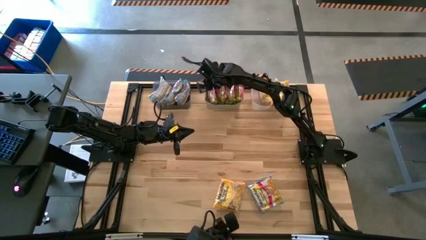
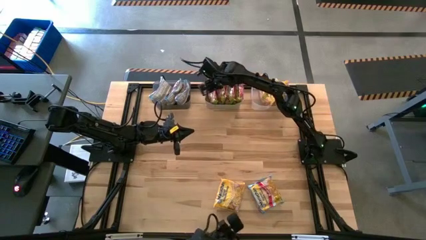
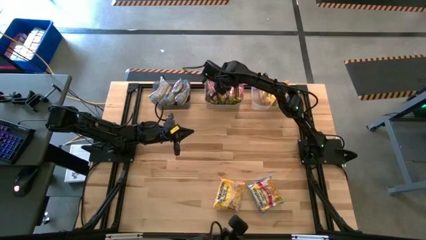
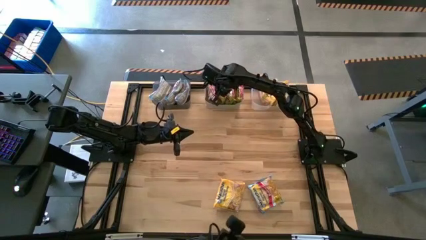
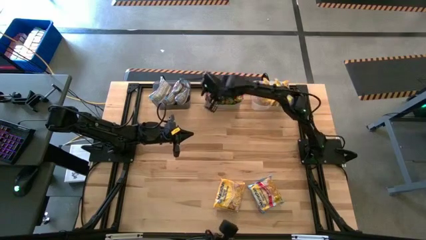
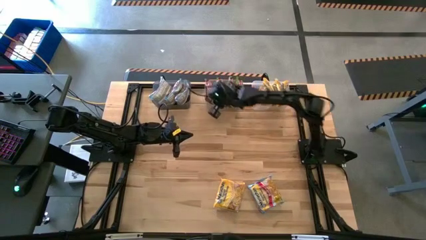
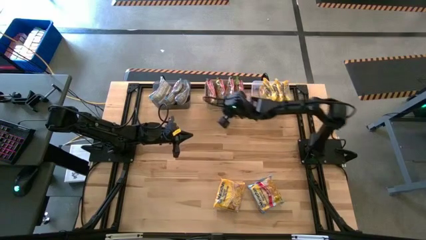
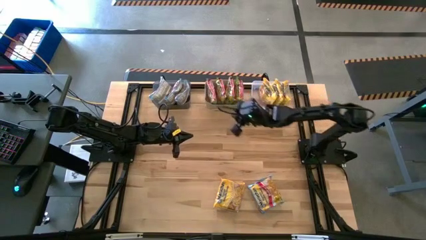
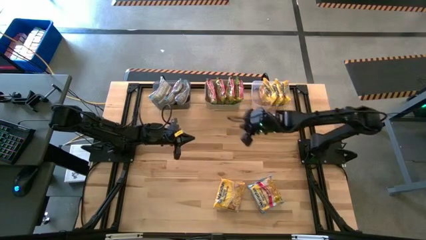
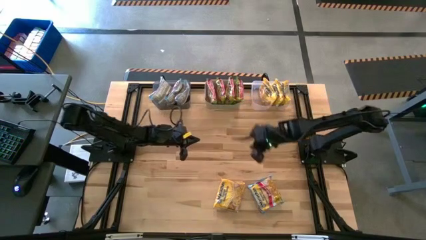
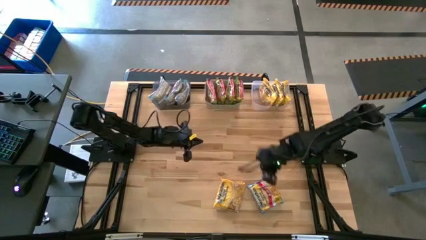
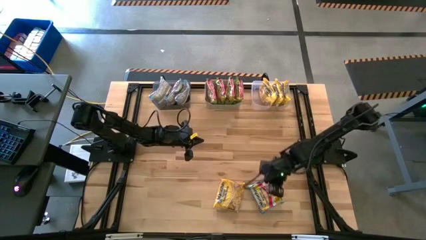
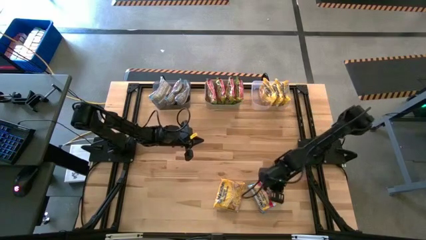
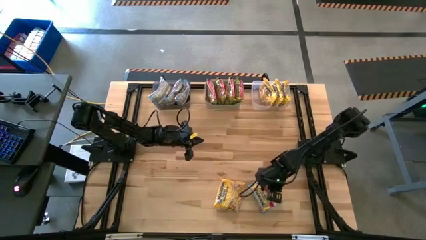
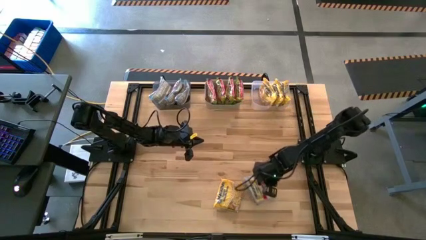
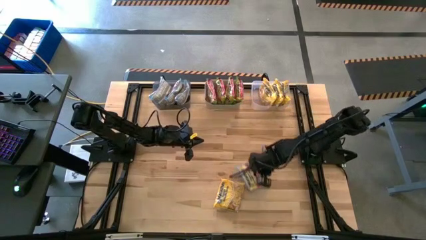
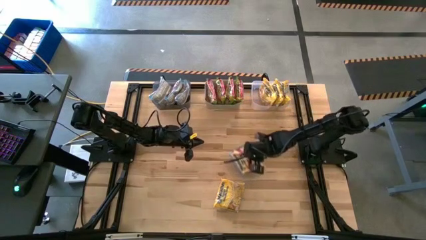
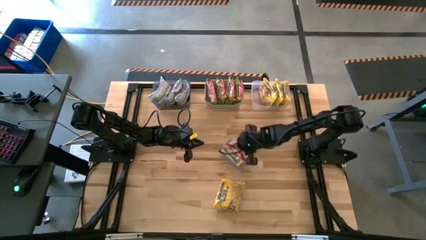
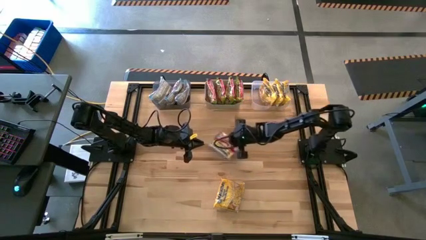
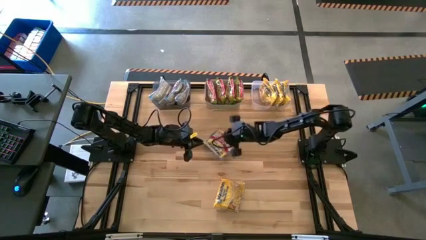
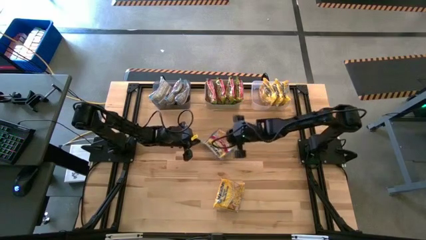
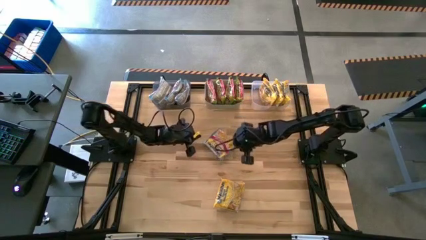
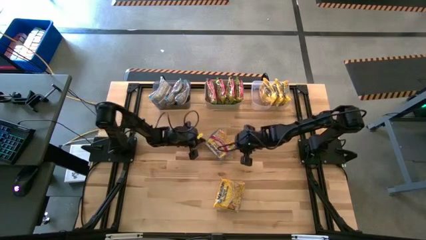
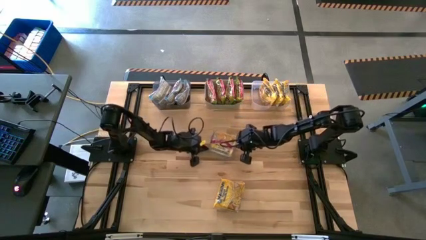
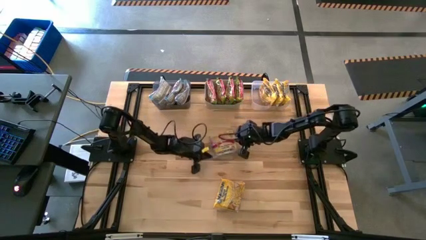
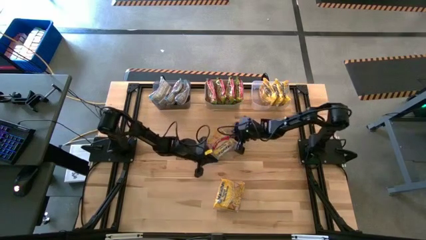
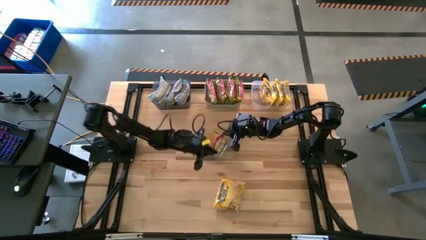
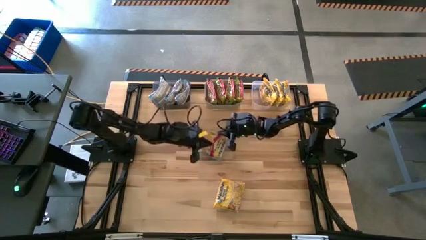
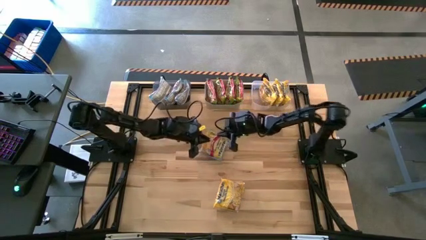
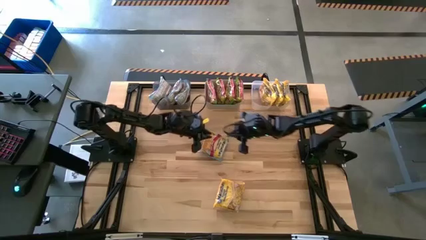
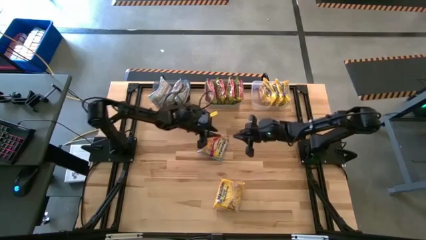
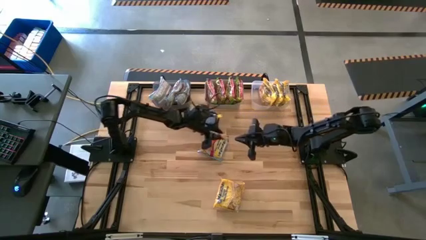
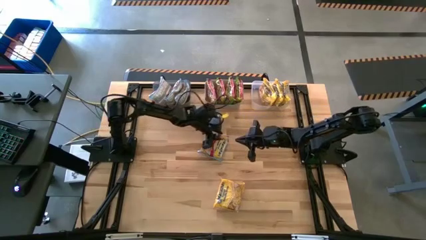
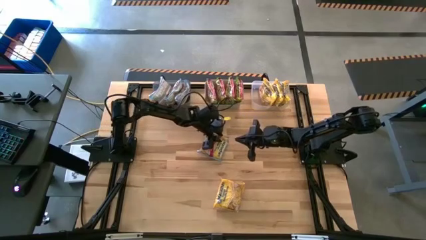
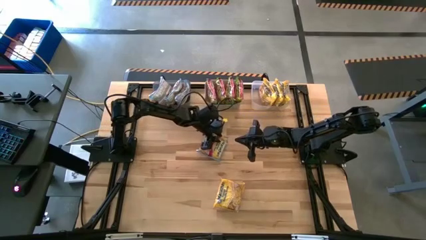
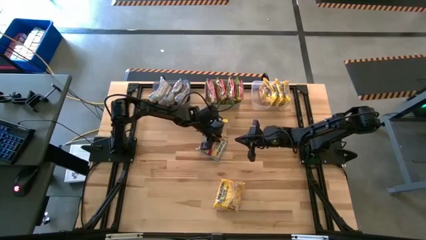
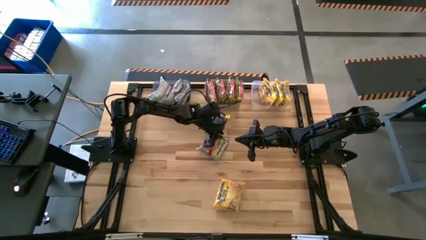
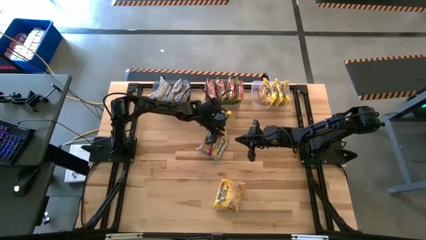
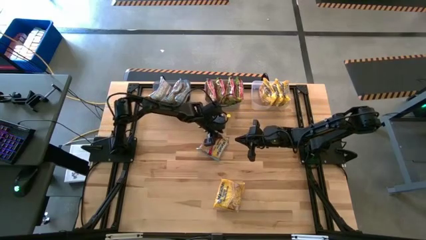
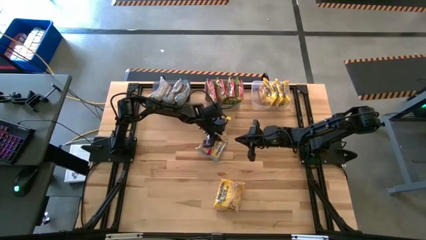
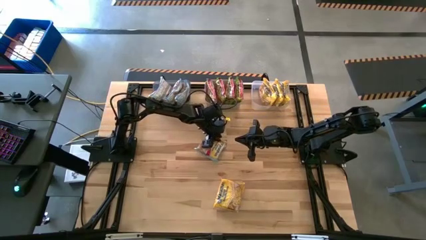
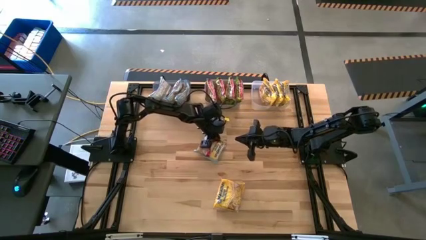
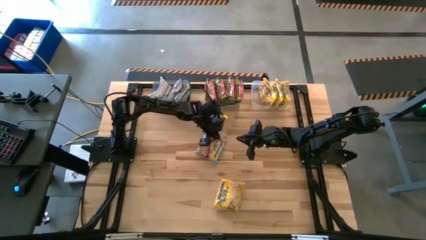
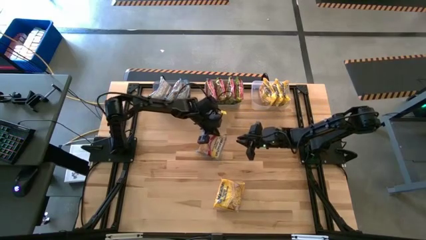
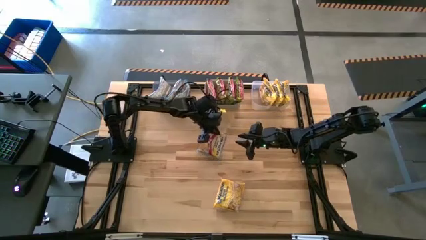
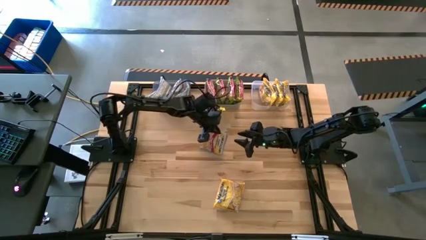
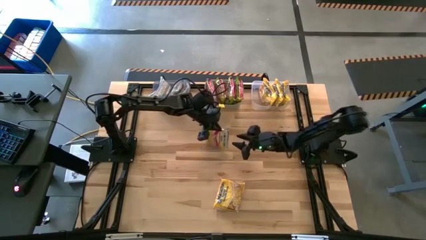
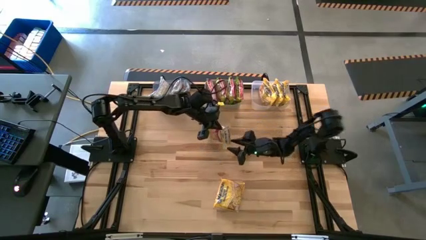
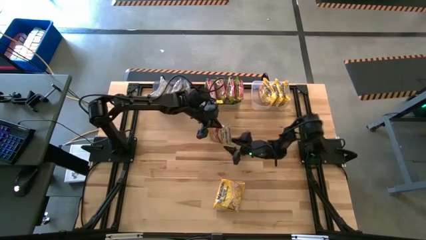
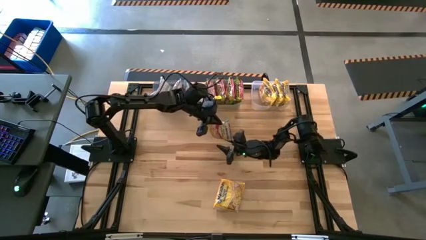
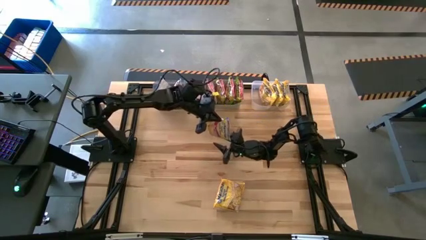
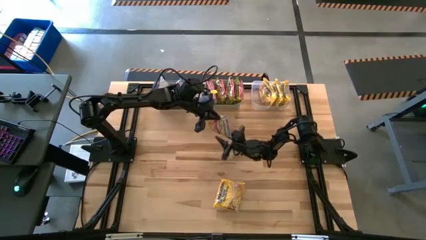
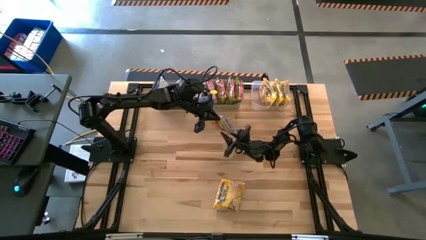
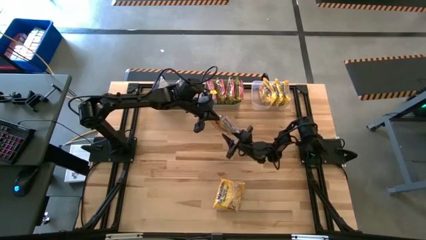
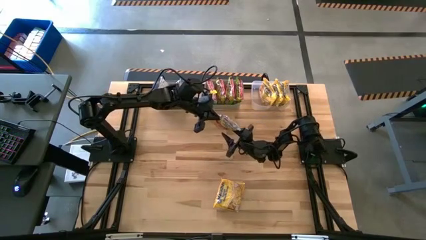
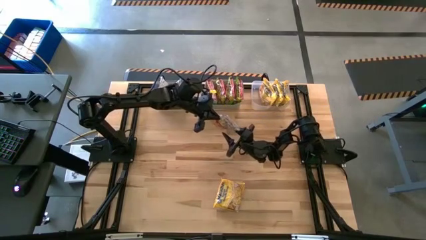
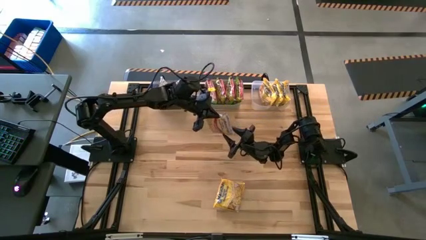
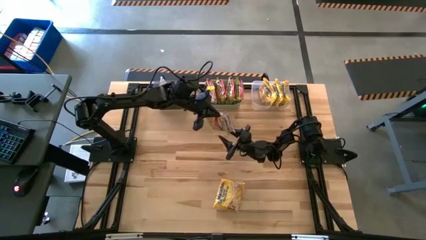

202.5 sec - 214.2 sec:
Task: Sort Maruchan noodles
Put the blue noodle pack into the black bin

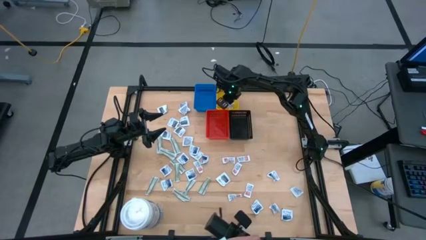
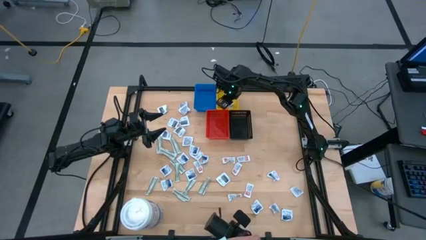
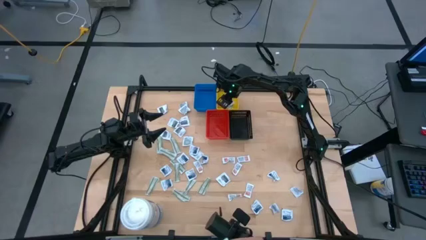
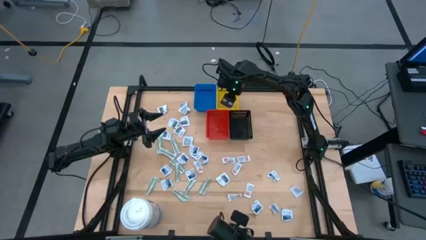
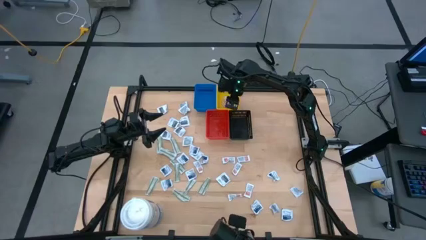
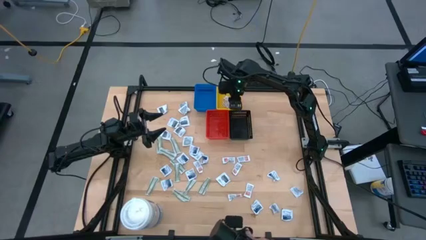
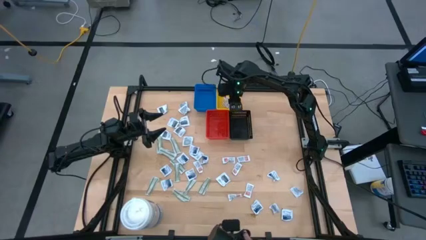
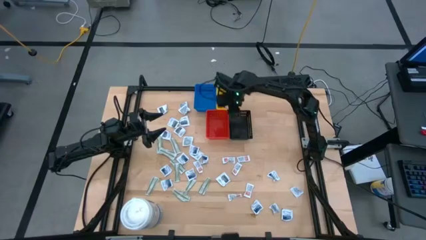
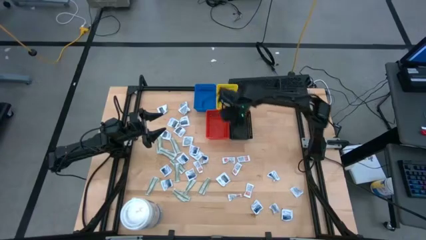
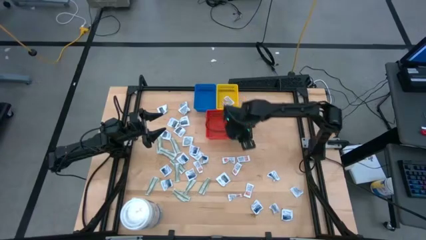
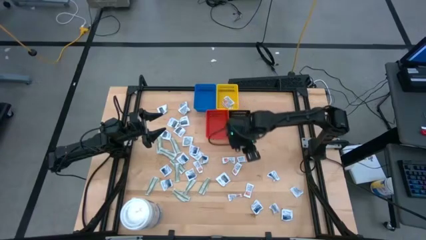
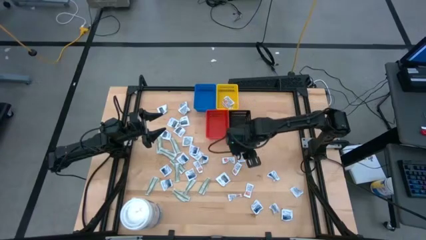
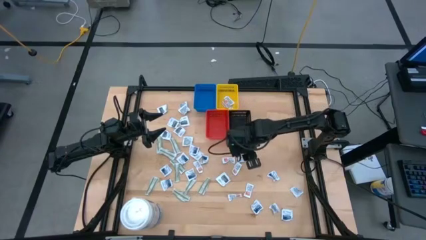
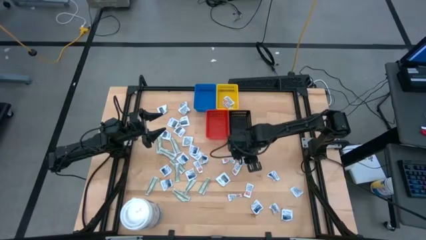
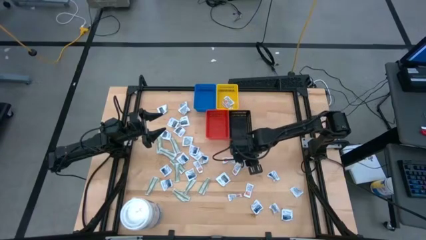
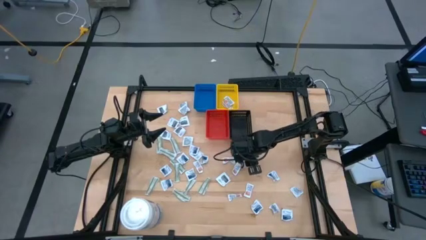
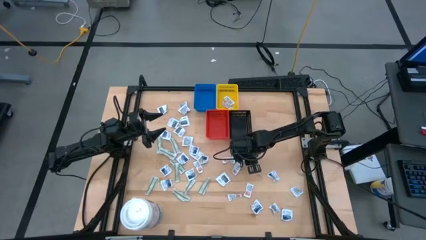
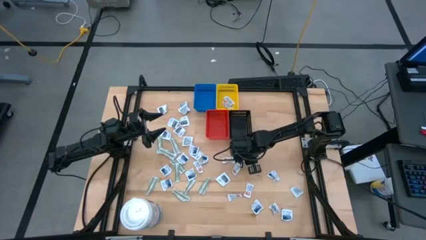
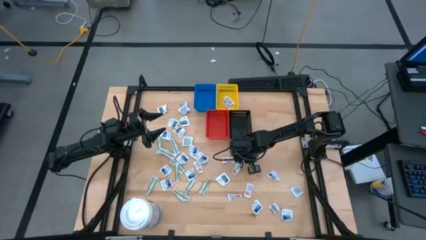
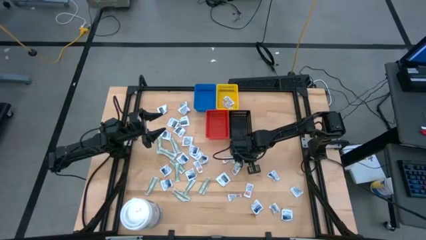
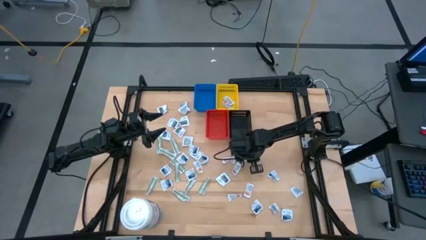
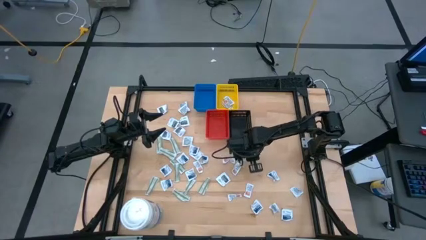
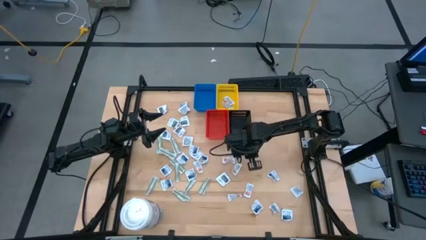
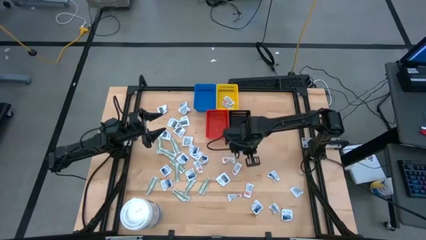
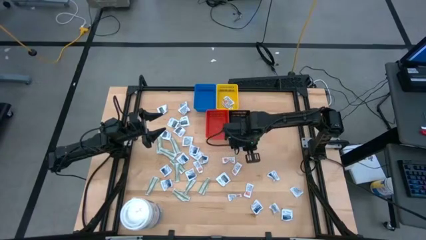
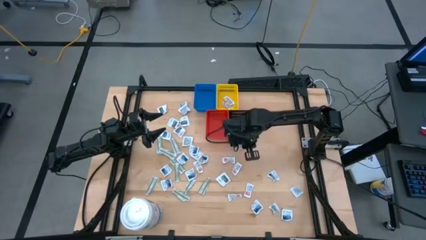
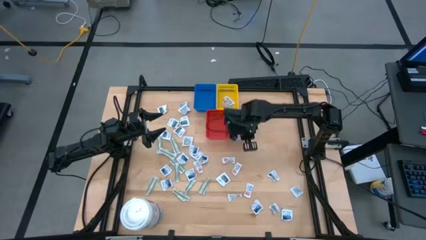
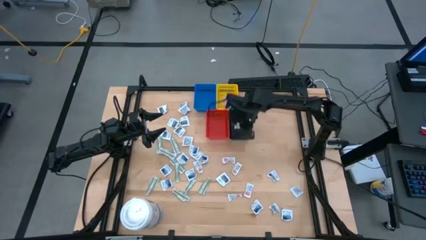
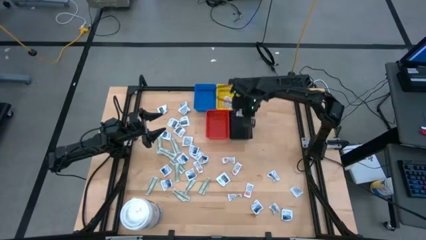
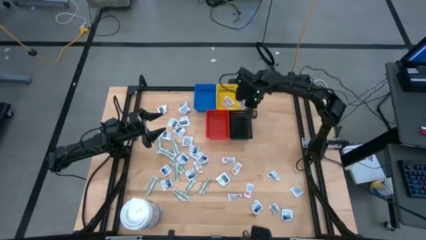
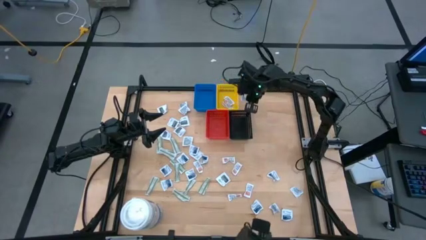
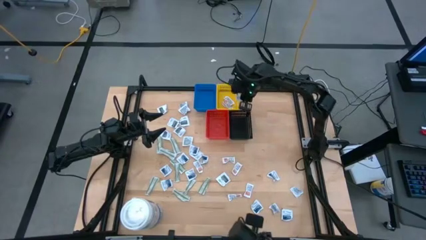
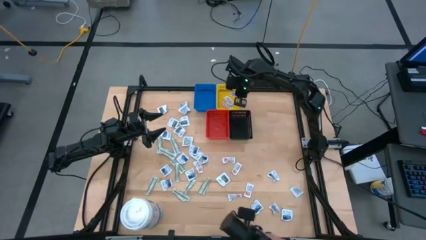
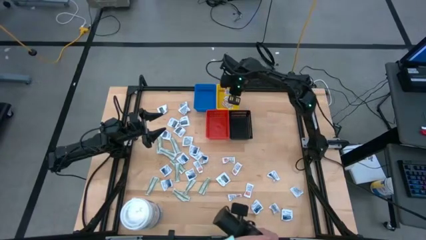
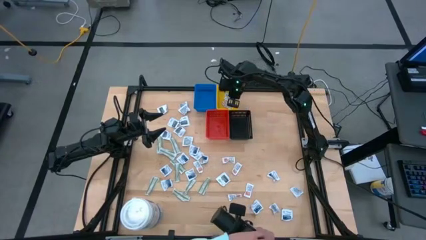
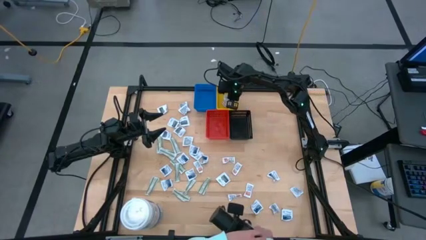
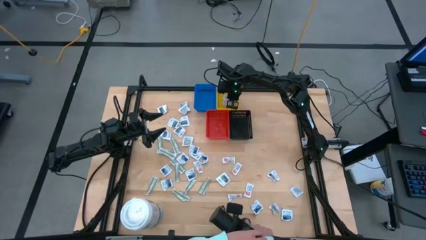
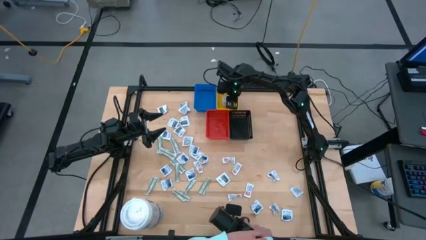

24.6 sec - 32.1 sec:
Task: Pick & Place First Aid Supplies
Put the ointment pack into the yellow bin
